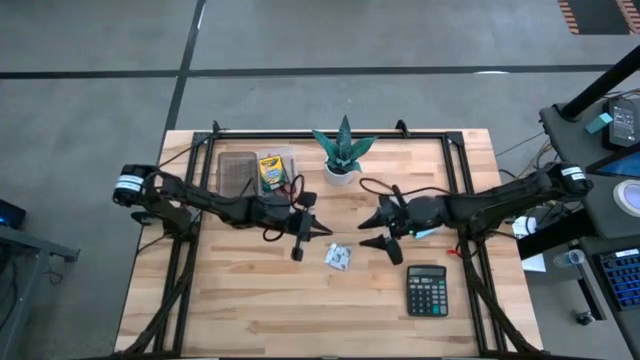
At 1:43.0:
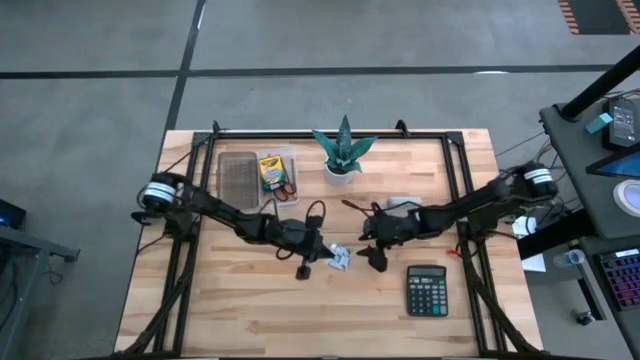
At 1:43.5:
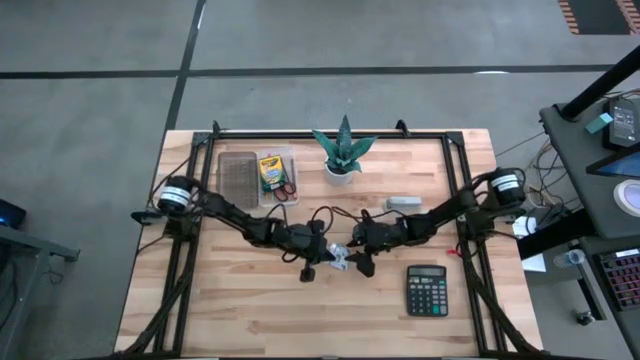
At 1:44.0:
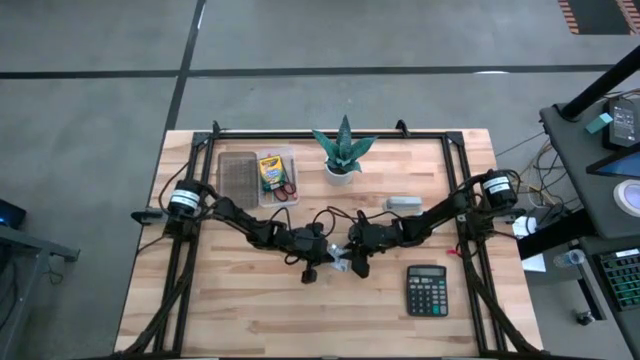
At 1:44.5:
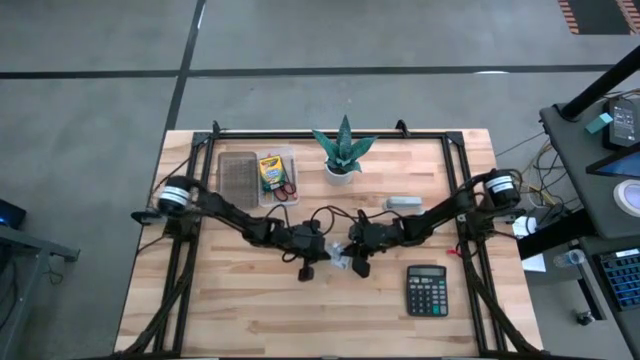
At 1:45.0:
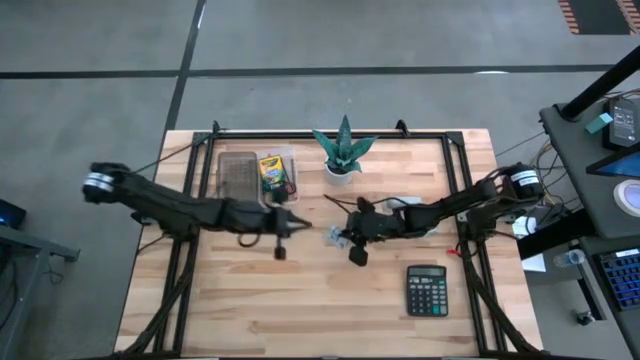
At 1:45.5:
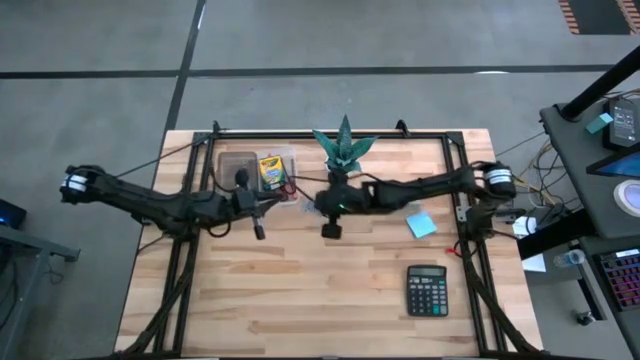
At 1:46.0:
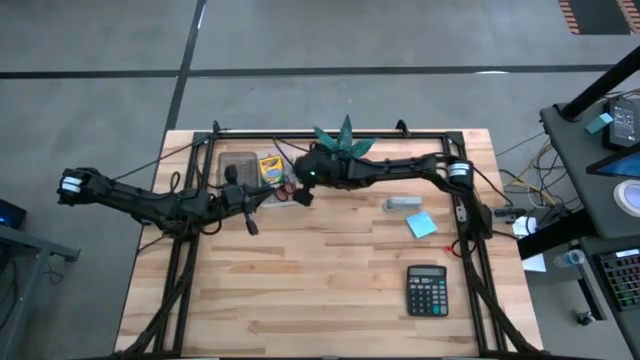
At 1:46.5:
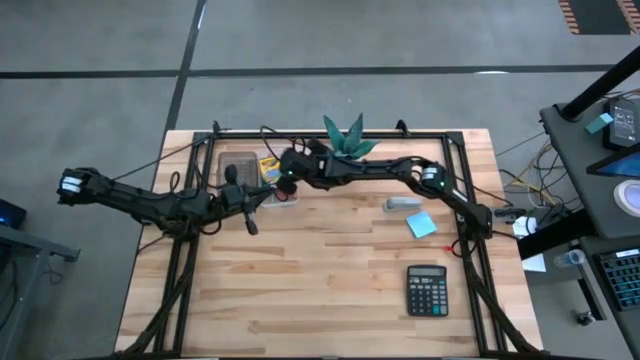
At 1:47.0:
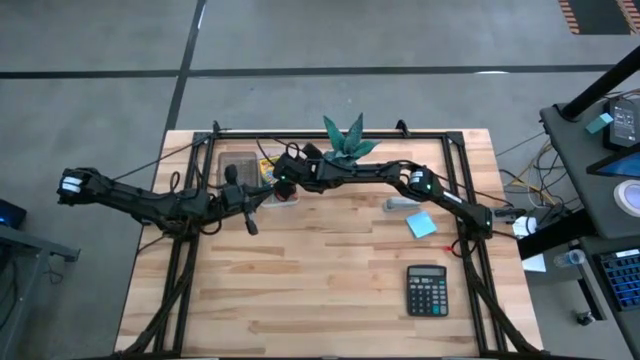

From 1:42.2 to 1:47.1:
Task: Pack school essentials
Put the blue sticky note into the black supply box

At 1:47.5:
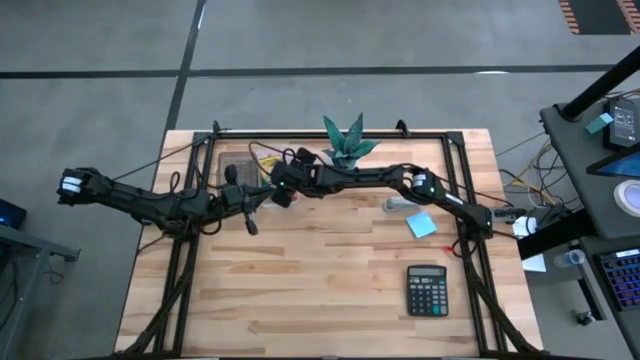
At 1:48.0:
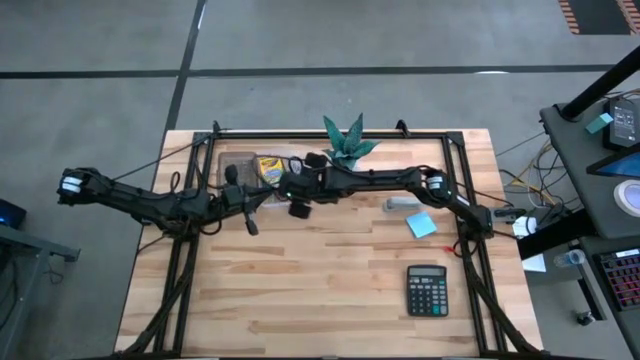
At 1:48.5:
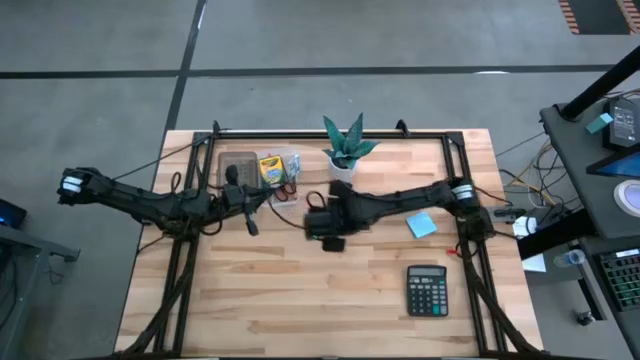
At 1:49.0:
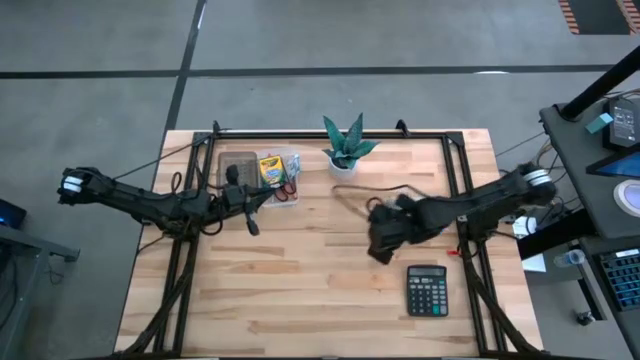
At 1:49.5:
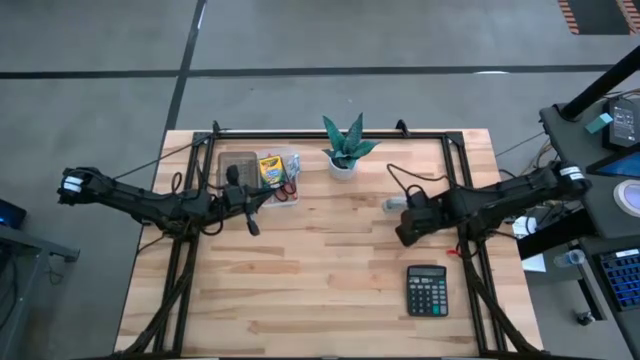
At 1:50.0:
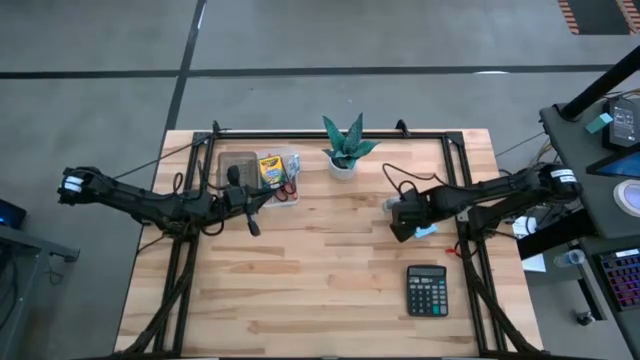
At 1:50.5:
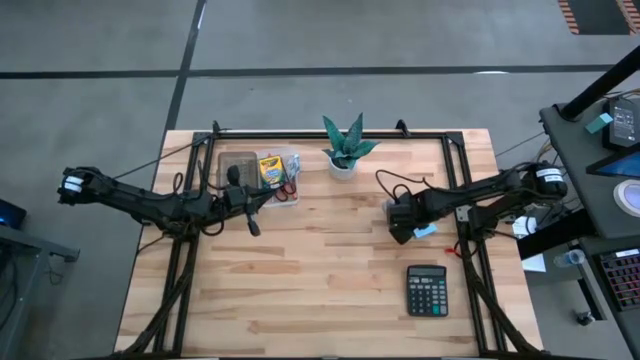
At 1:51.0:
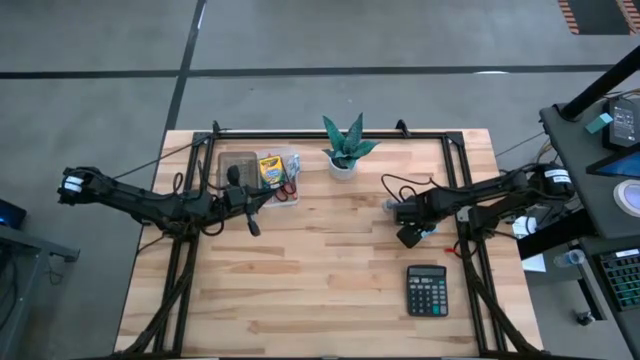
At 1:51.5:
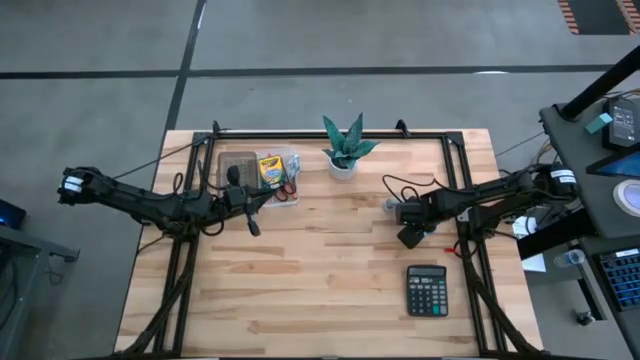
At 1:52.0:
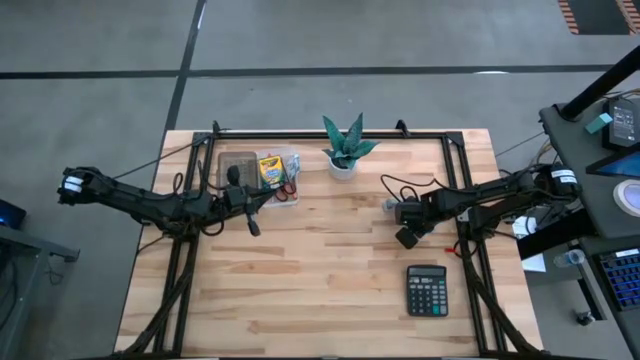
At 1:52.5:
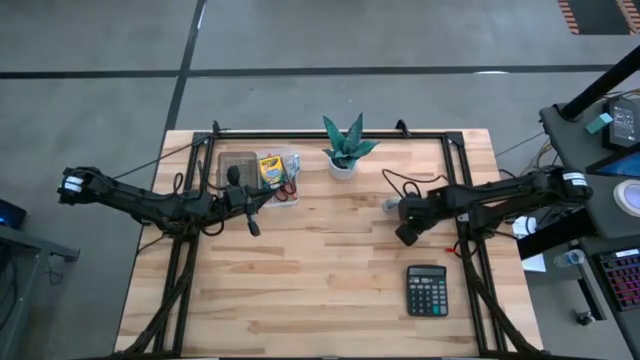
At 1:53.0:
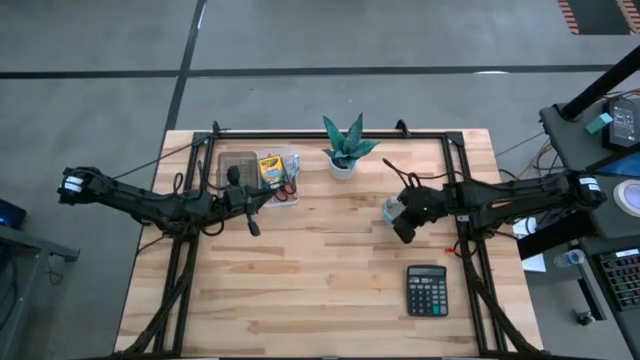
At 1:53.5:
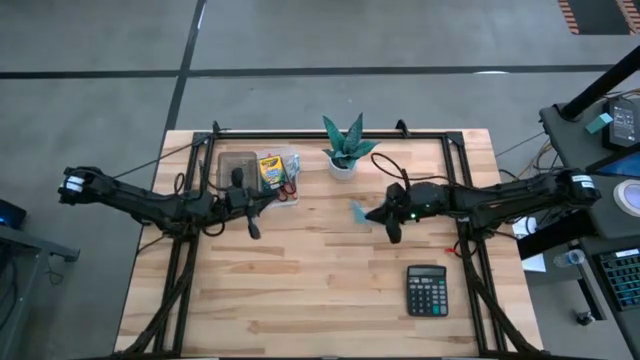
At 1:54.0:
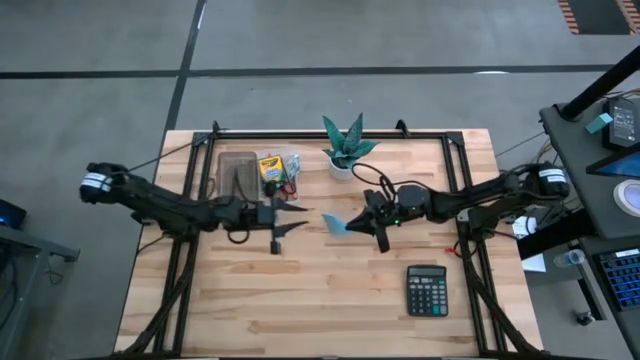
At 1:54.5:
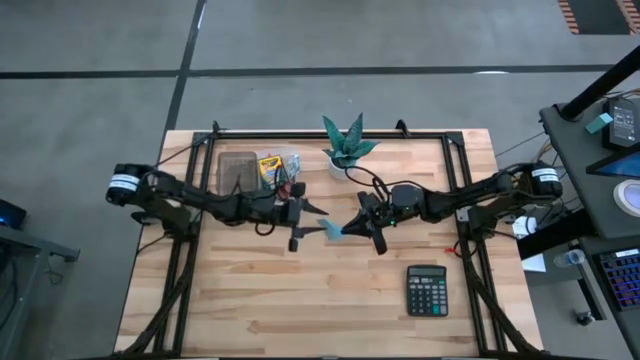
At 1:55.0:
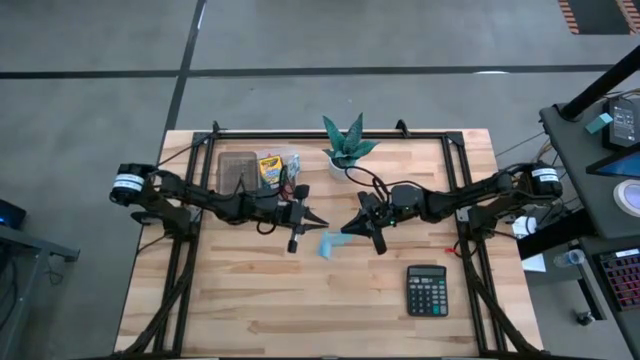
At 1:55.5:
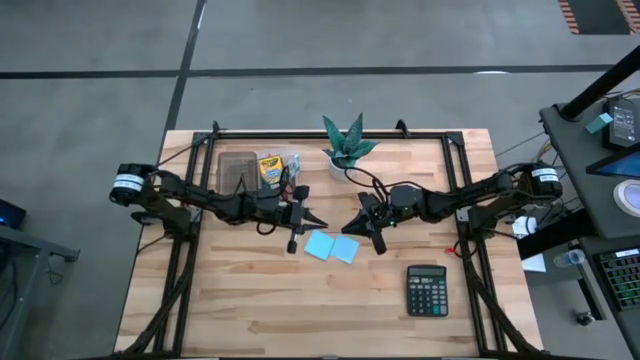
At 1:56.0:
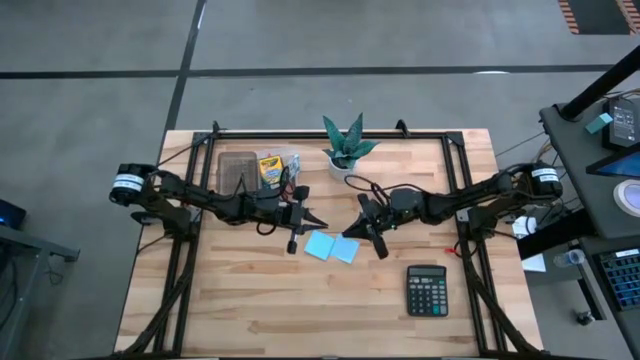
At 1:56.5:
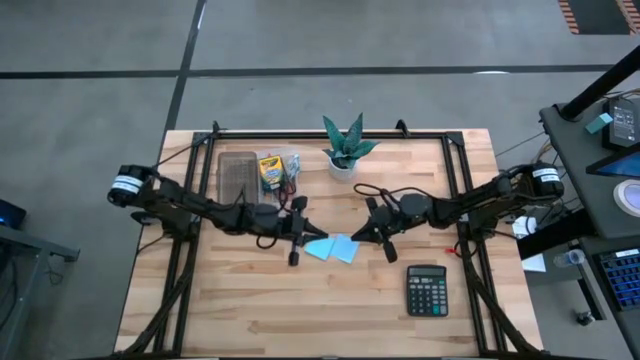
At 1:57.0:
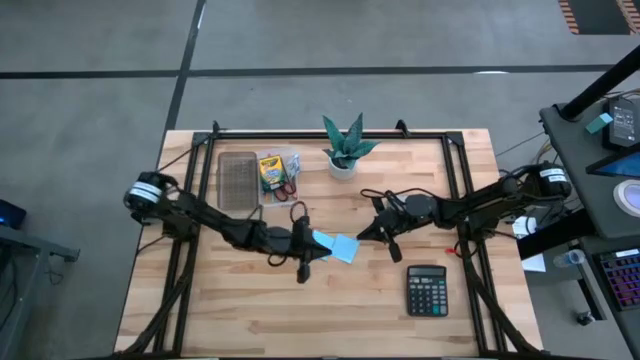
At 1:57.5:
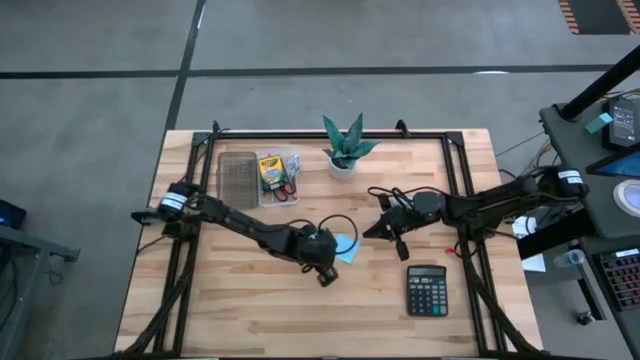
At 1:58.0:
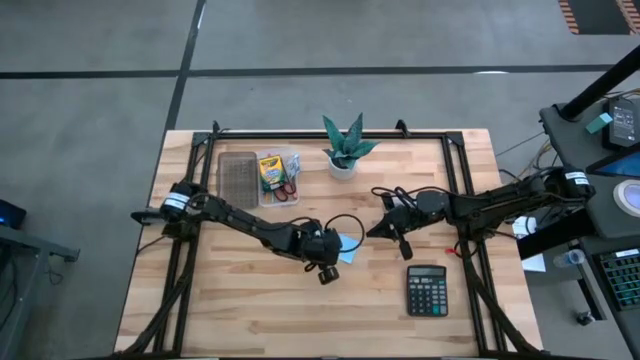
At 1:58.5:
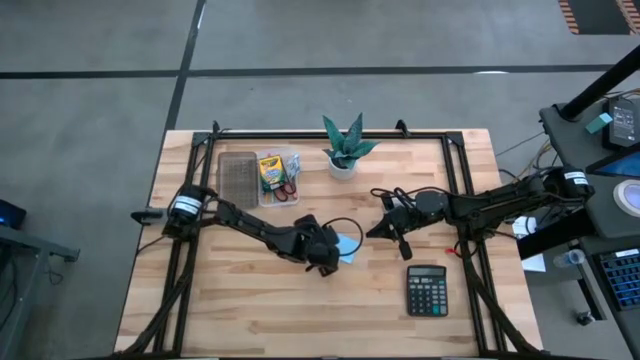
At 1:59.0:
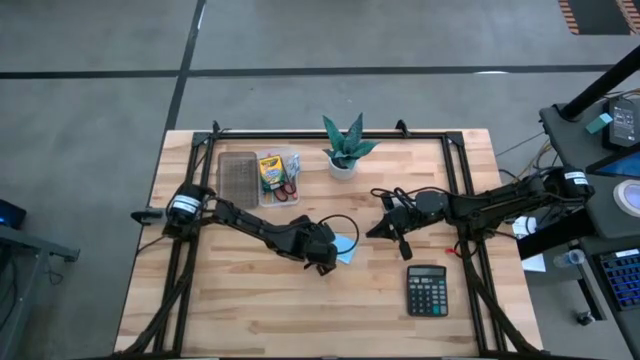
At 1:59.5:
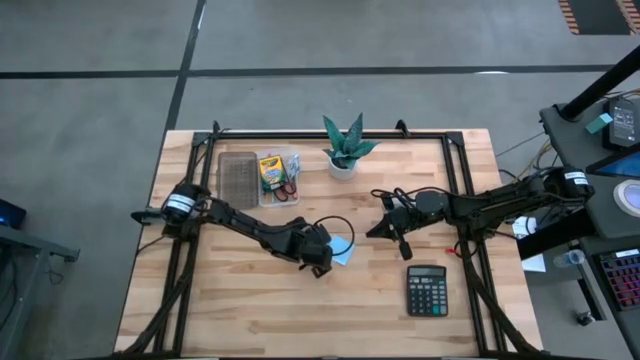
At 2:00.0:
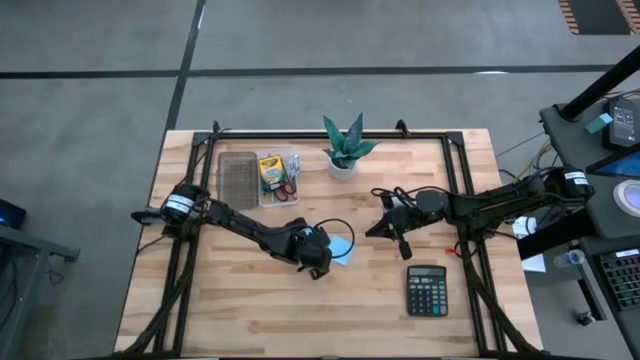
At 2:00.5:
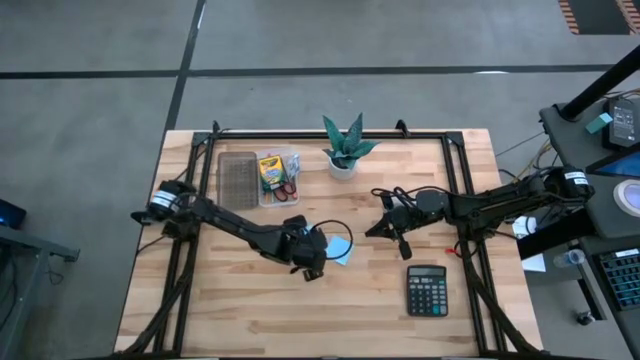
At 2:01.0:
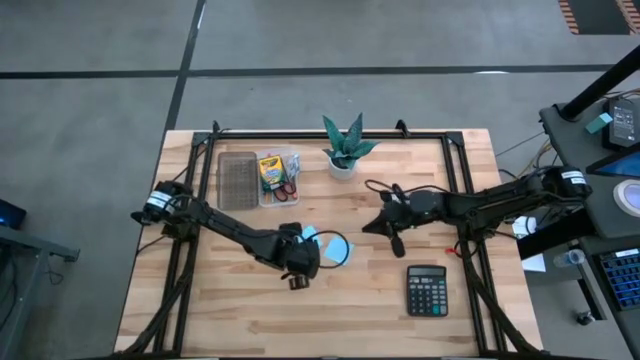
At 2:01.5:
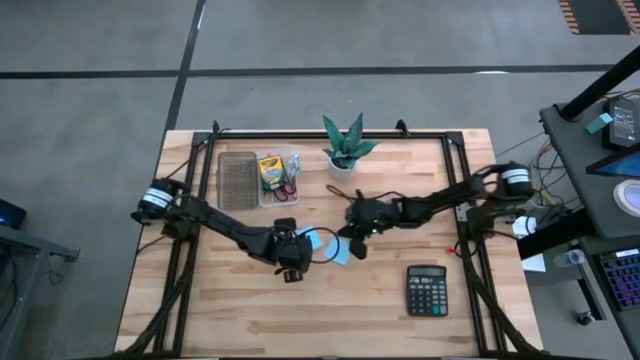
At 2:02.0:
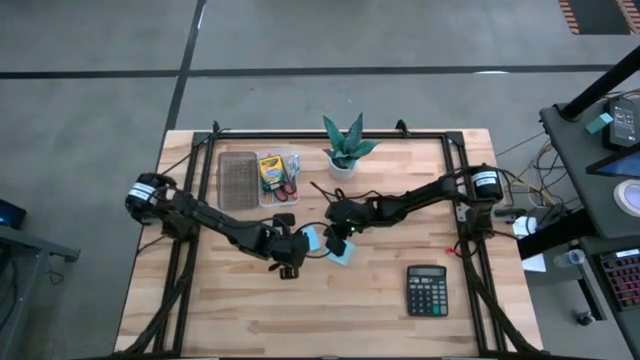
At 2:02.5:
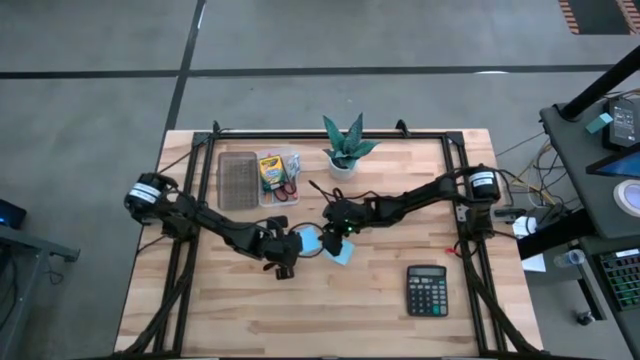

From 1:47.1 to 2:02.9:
Put the blue sticky note into the black supply box

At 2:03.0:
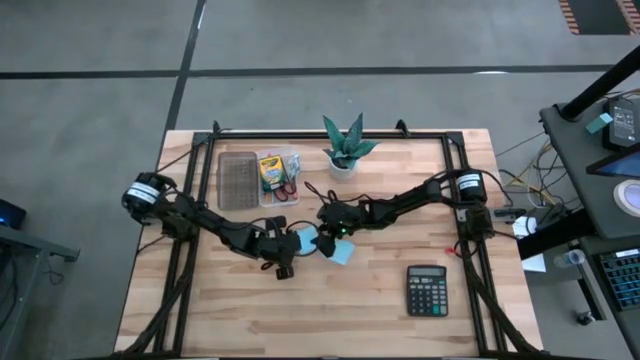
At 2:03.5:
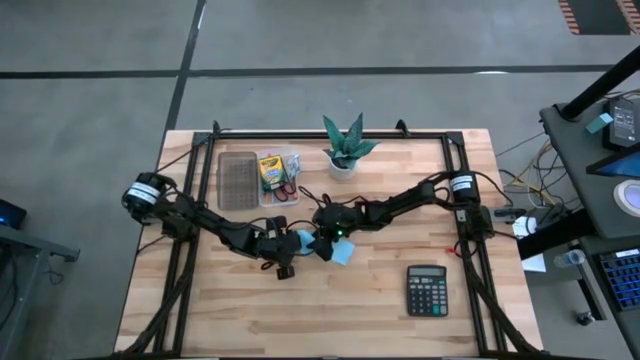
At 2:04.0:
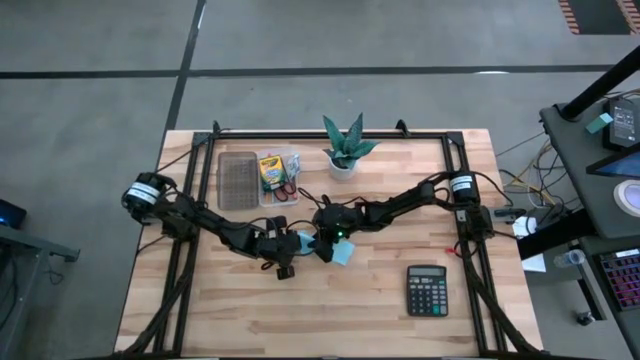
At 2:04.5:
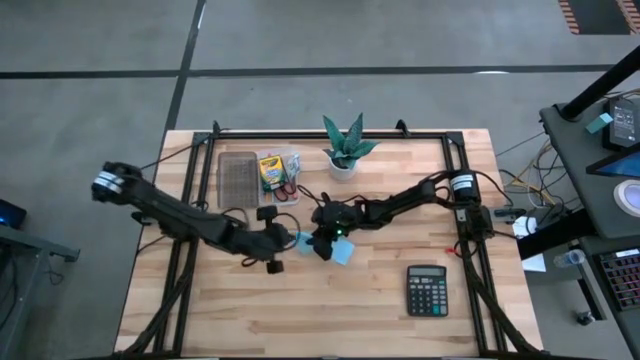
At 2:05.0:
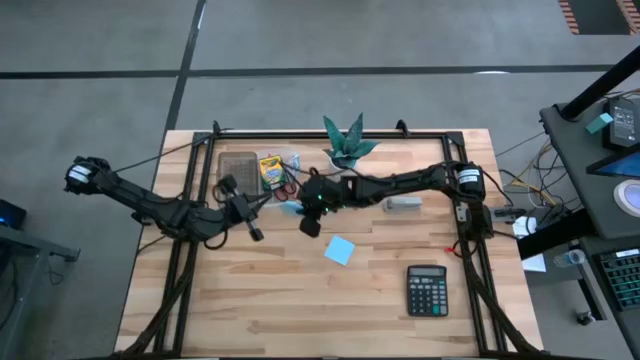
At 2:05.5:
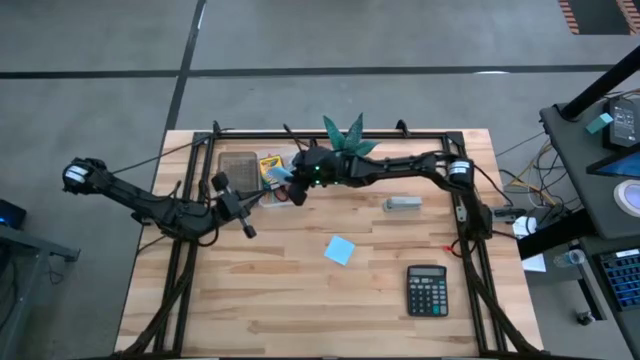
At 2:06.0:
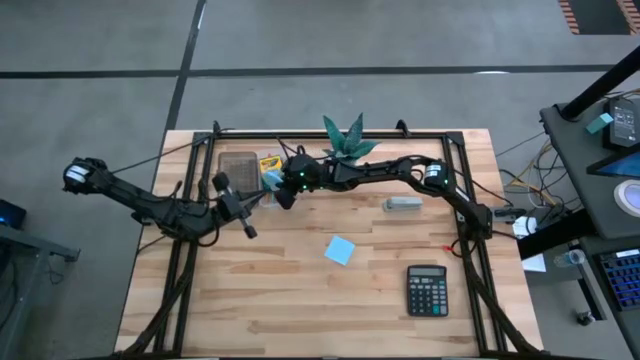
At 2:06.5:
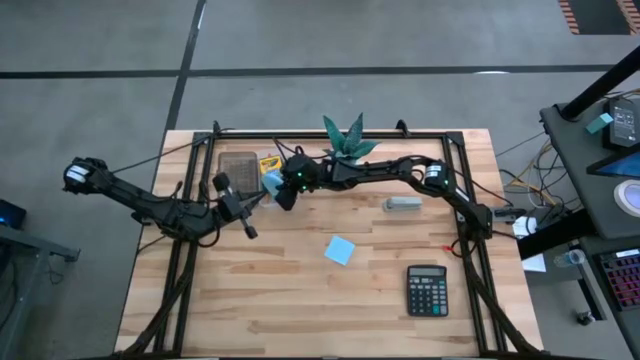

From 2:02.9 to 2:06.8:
Put the left blue sticky note into the black supply box
